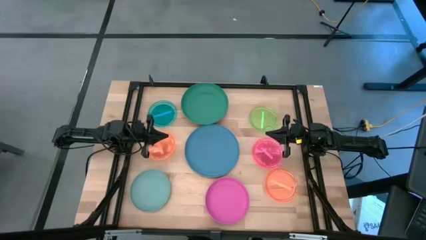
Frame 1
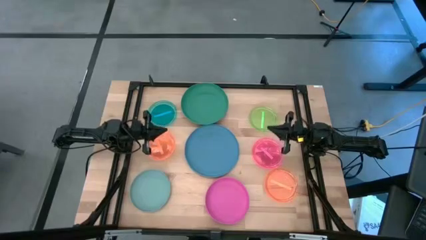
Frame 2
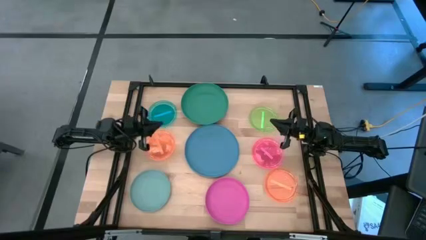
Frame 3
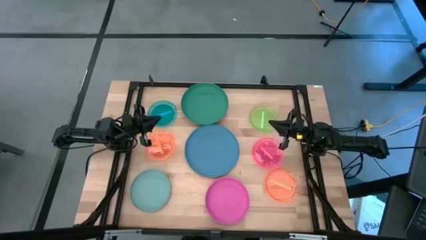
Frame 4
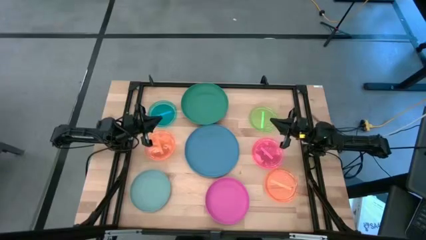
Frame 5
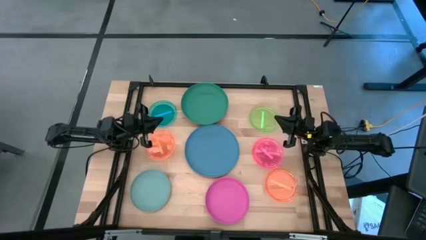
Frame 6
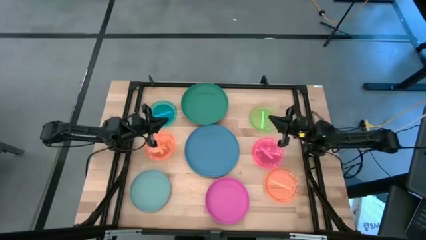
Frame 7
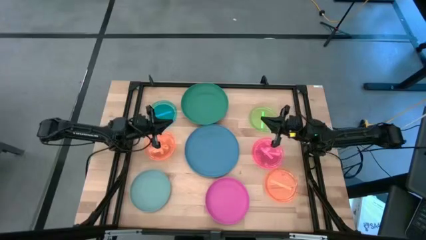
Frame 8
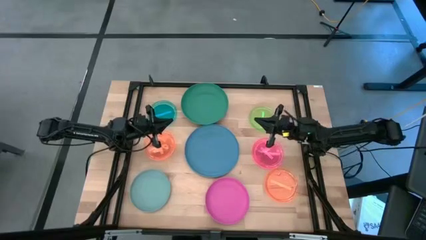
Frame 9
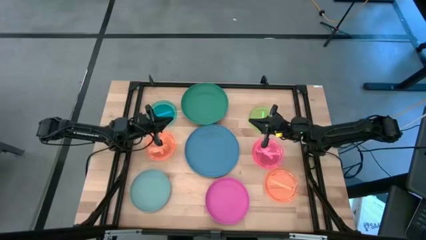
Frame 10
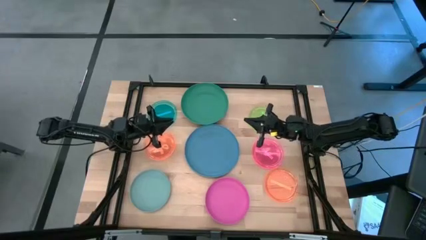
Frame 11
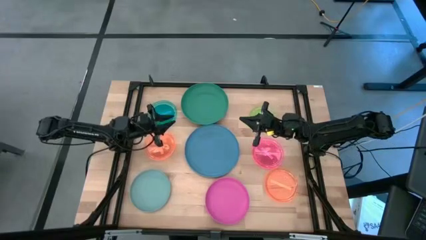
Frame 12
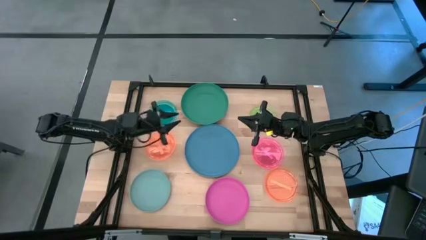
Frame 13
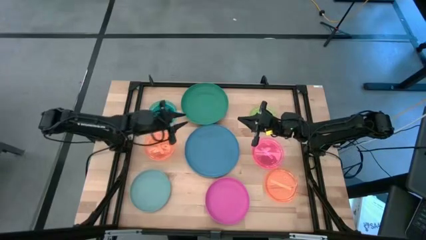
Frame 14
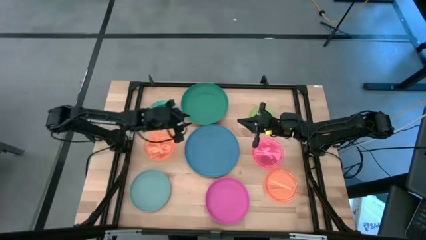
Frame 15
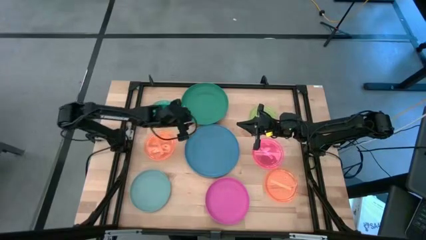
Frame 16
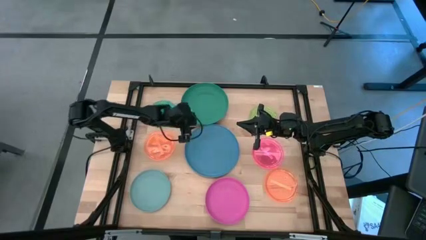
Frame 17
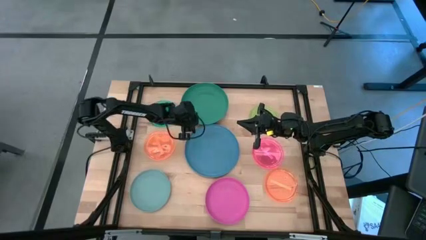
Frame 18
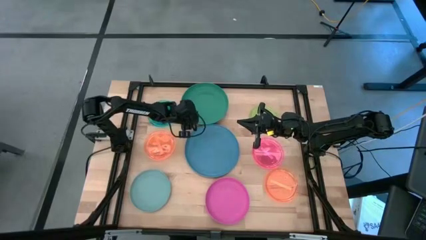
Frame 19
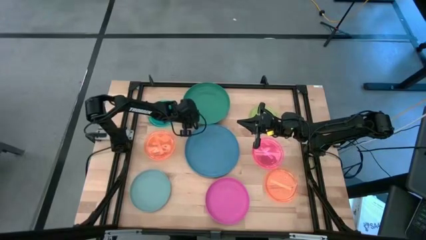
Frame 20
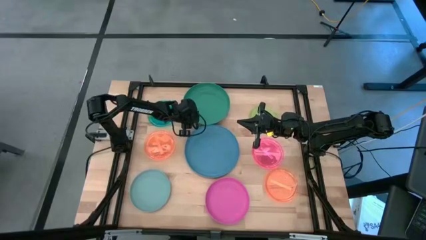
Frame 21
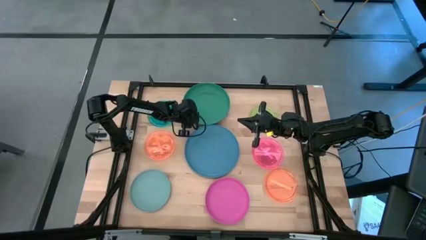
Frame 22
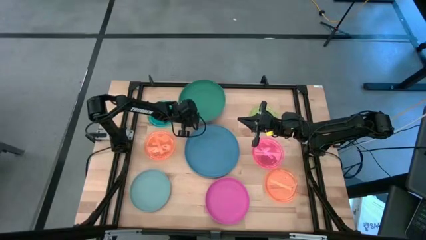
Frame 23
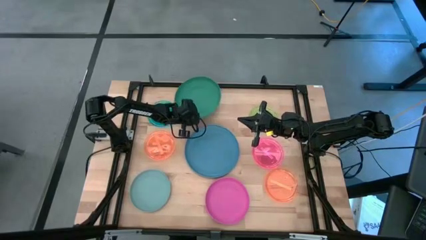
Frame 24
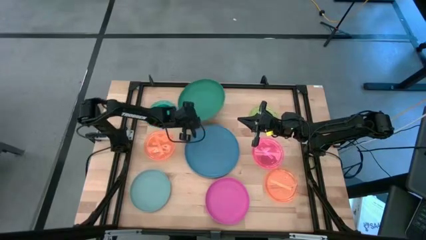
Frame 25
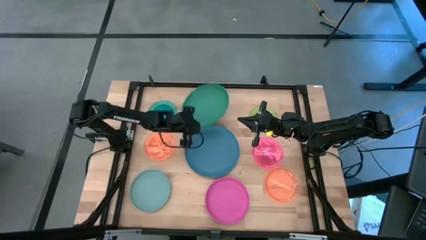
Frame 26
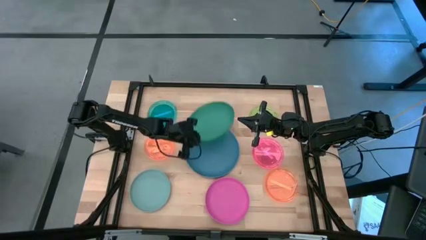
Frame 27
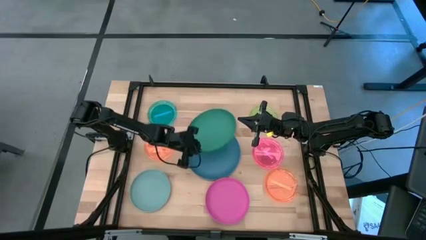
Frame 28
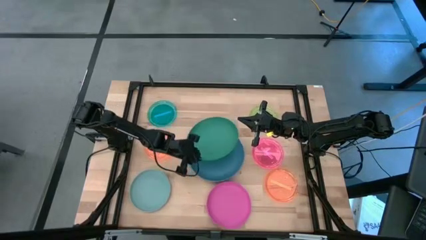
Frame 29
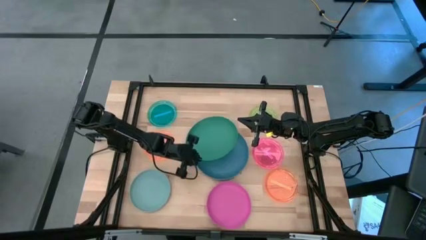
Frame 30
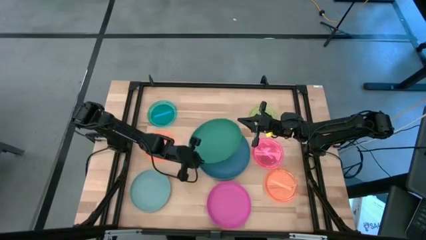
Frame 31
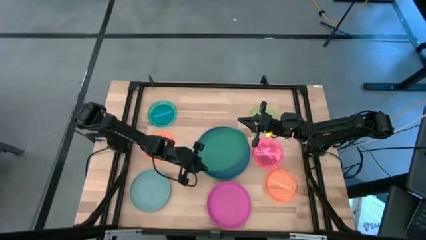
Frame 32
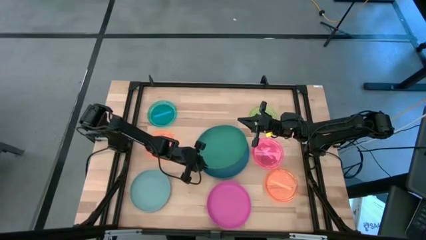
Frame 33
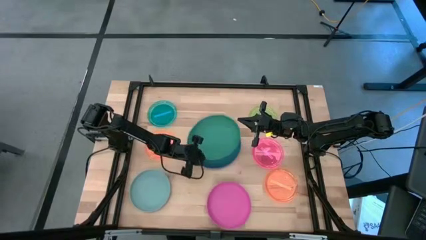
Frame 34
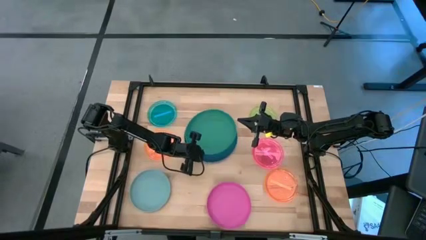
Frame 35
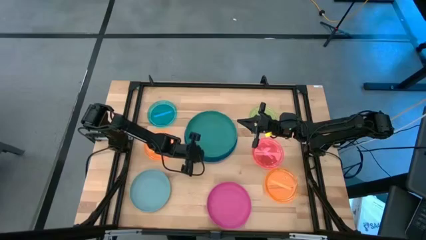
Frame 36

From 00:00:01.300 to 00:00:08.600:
Task: Stack plastic plates
Put the green plate on top of the dark blue plate

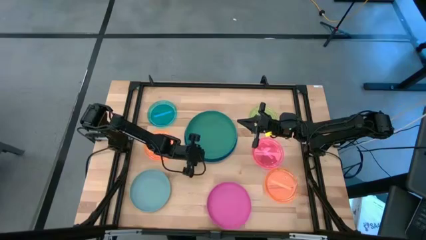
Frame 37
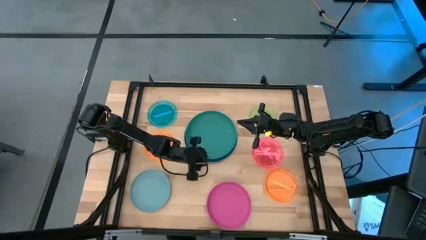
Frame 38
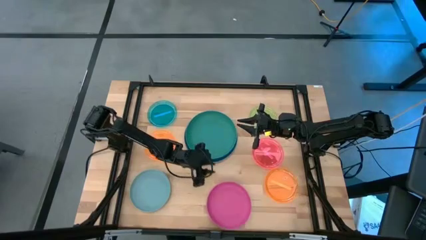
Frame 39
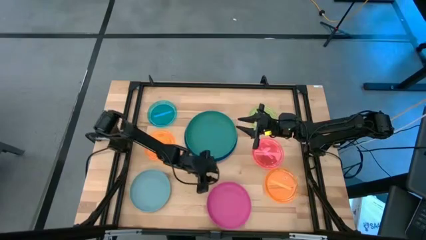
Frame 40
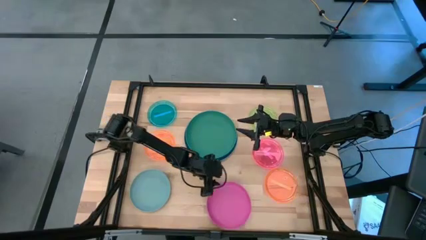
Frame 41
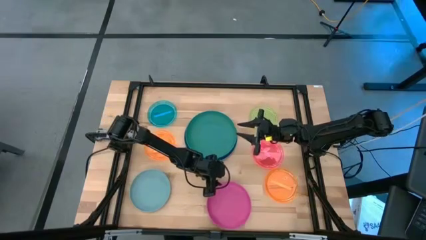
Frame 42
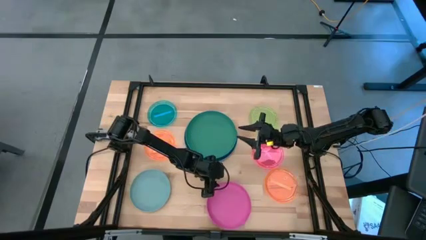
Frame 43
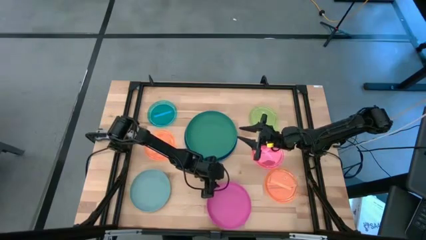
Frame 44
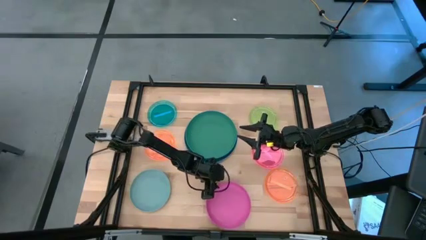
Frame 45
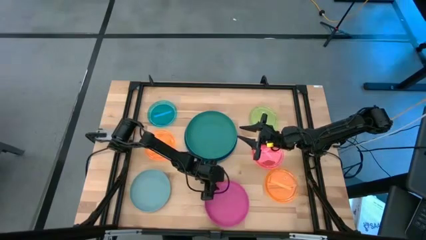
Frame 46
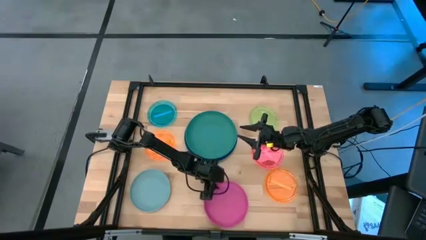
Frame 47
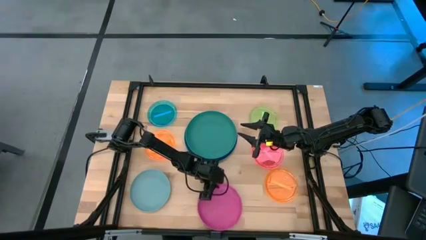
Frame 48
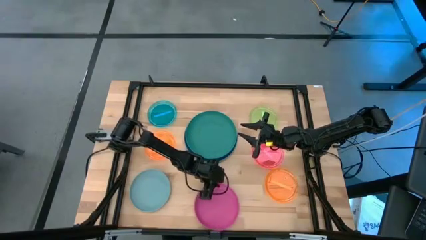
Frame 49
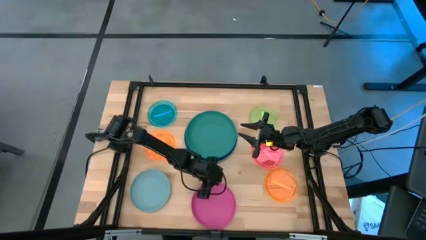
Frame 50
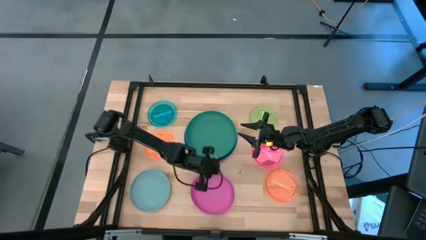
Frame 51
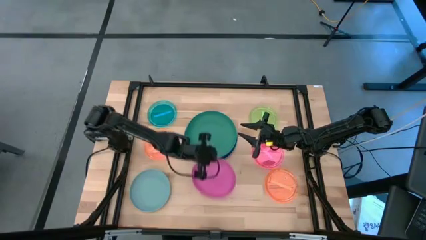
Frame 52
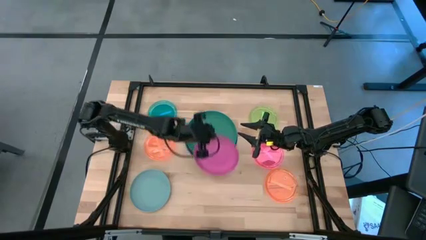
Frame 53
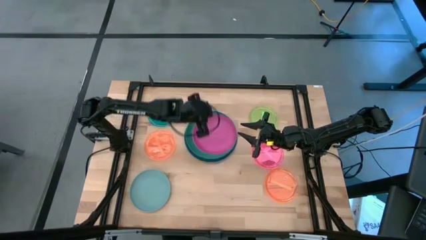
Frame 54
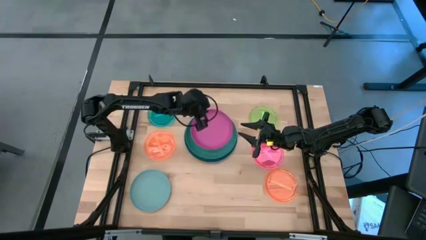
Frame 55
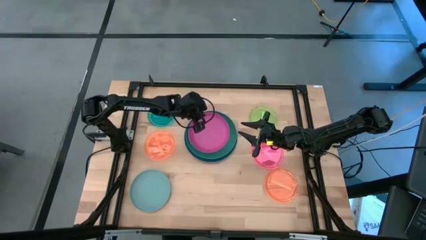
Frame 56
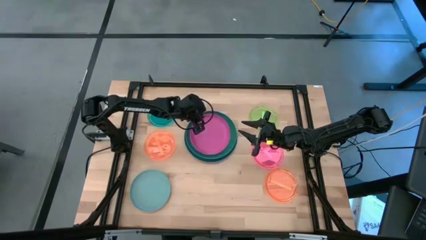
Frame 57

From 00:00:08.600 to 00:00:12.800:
Stack the pink plate on top of the green plate

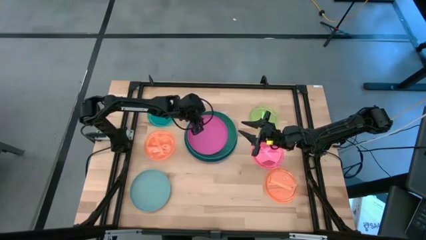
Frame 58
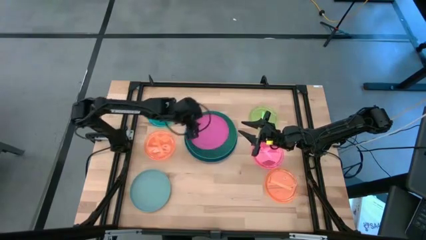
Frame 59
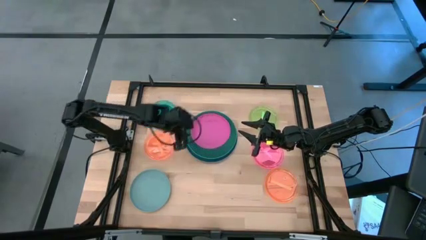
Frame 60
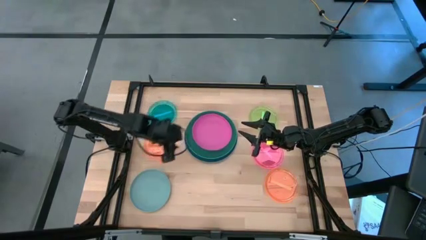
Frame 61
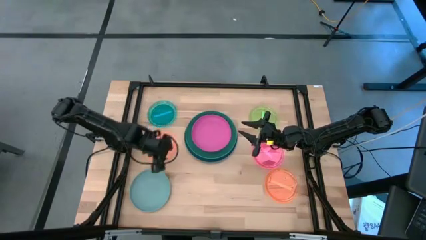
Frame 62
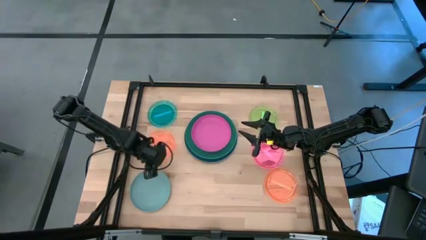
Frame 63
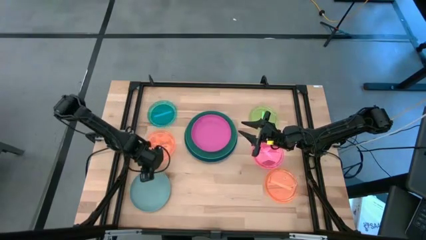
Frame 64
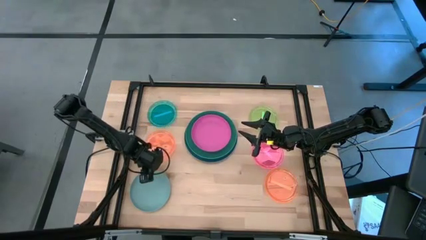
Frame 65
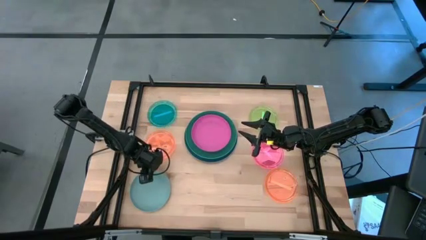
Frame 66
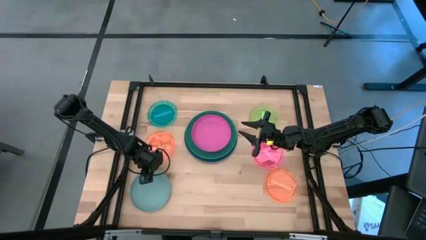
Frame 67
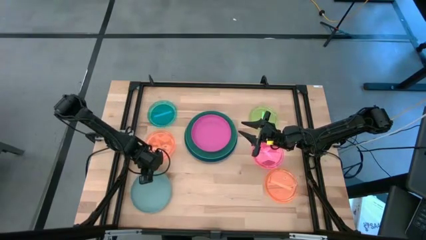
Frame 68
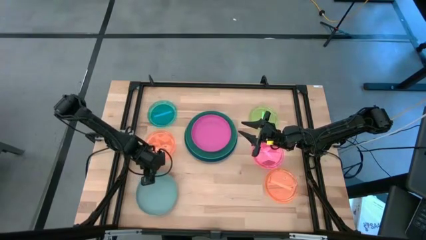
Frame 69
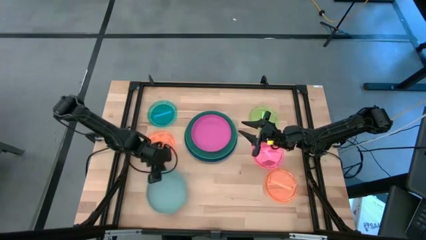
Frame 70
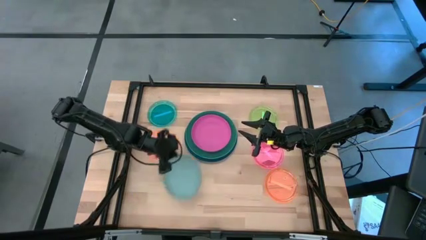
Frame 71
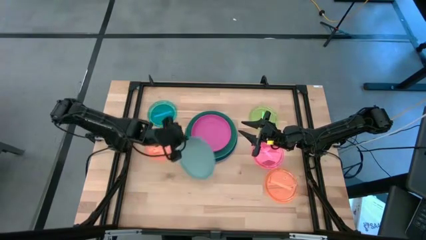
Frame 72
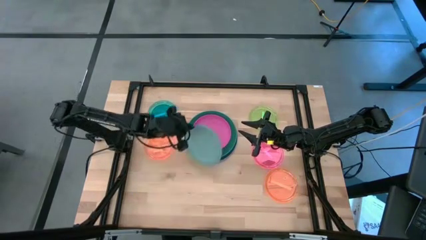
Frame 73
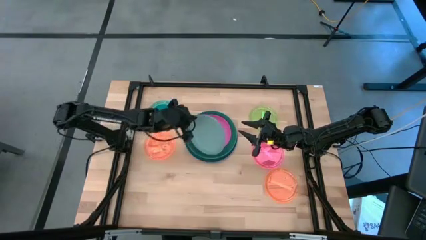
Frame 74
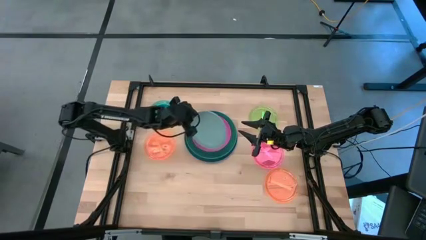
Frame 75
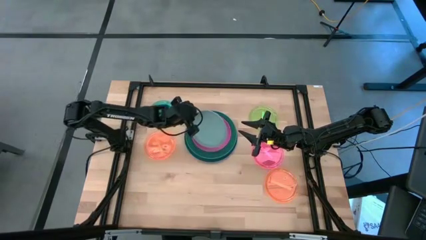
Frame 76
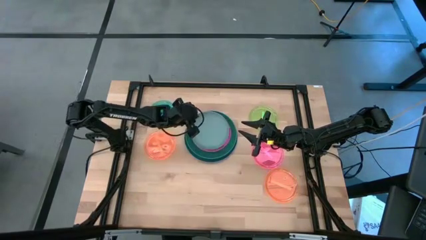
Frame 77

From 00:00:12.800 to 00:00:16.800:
Stack the gray plate on top of the pink plate

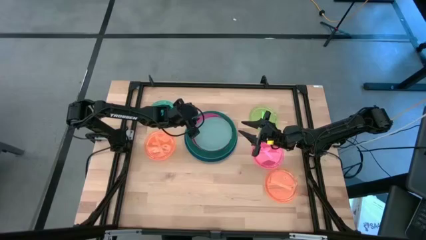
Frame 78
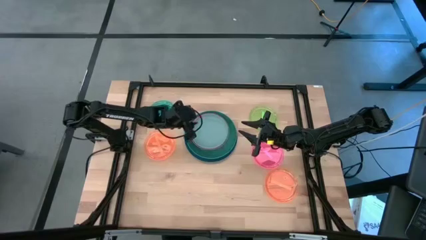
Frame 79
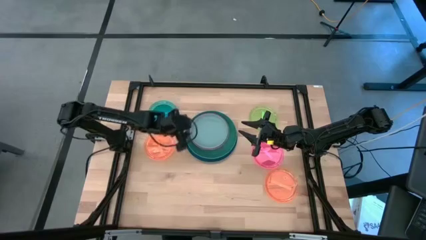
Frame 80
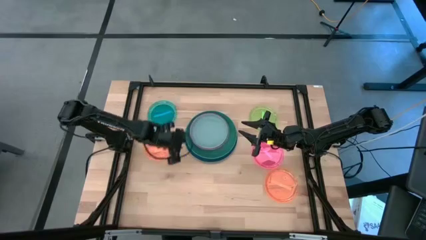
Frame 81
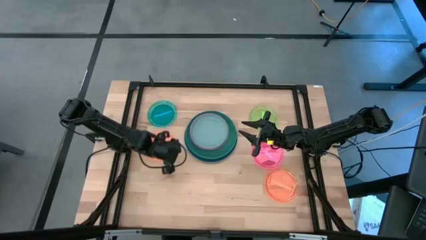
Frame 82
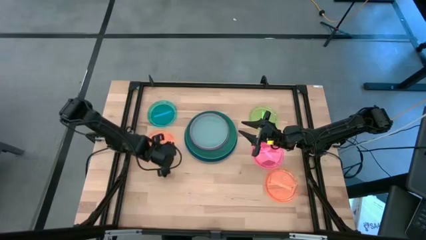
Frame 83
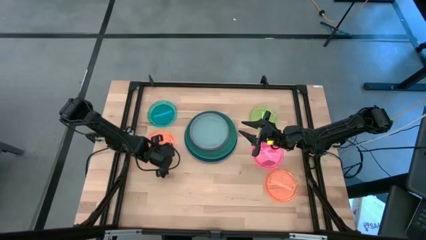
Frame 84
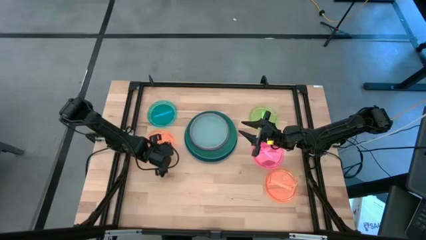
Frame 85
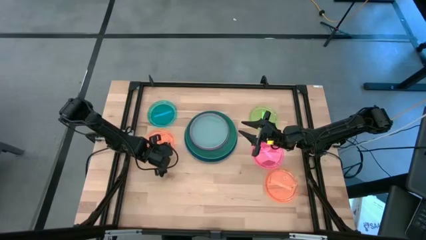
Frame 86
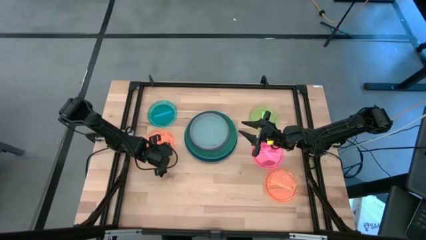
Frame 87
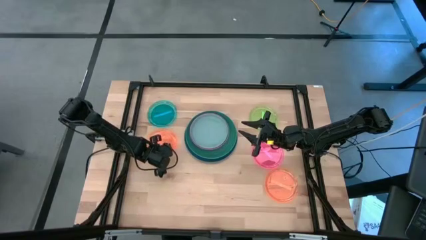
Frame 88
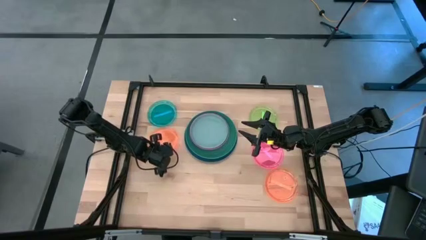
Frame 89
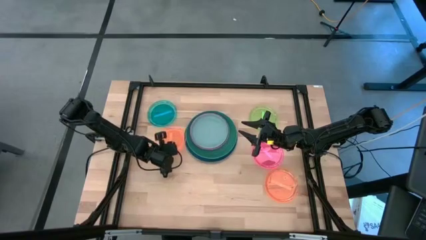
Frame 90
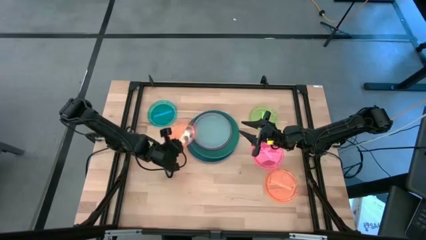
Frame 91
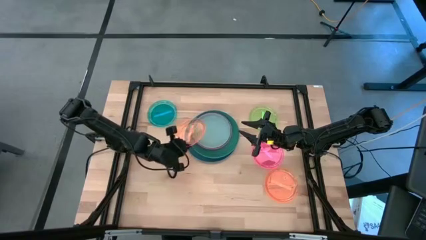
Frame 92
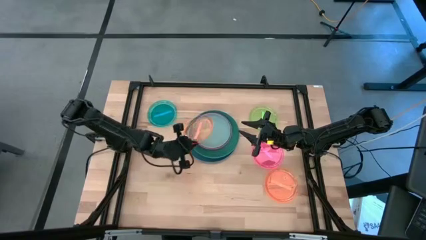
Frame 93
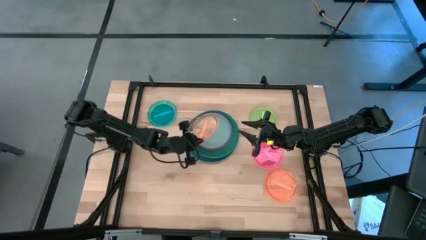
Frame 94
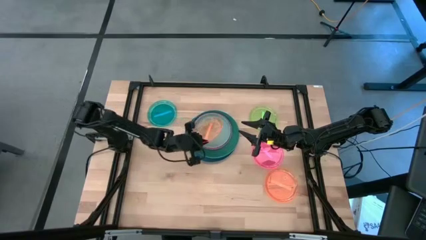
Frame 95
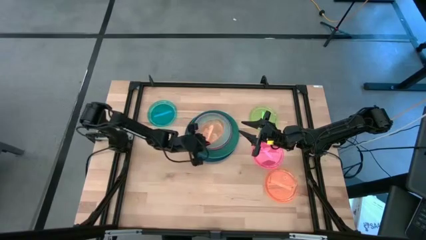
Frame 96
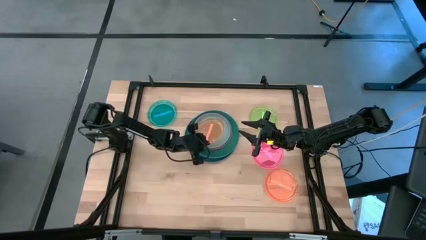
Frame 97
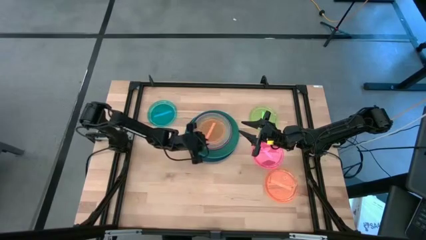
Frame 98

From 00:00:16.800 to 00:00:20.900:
Stack the left orange plate on top of the gray plate
